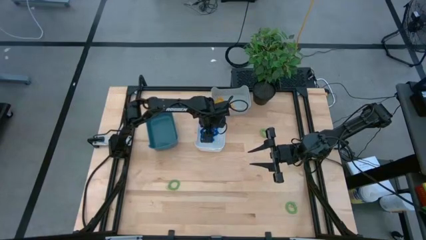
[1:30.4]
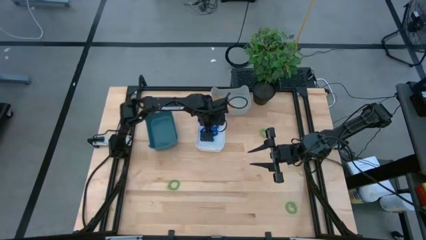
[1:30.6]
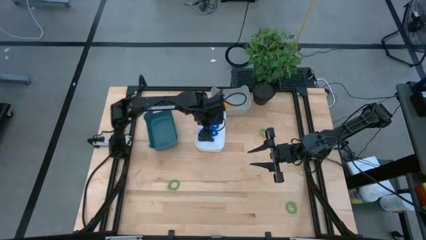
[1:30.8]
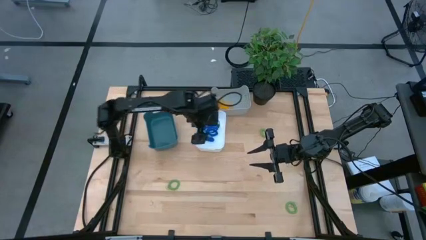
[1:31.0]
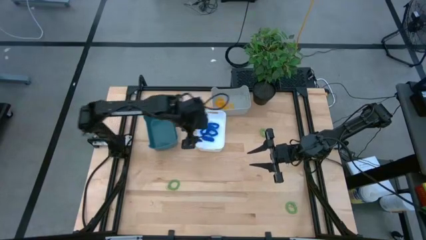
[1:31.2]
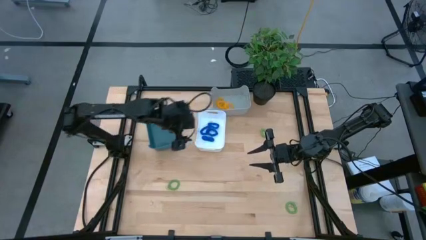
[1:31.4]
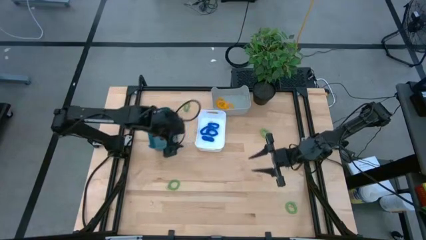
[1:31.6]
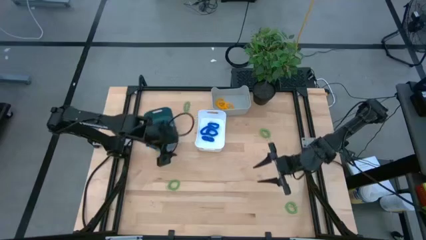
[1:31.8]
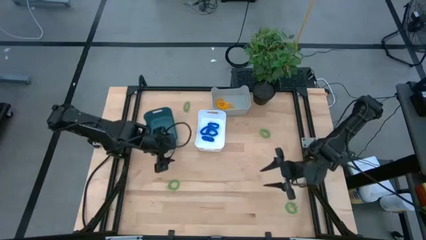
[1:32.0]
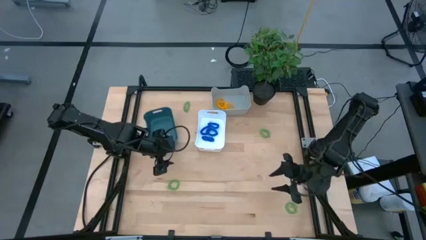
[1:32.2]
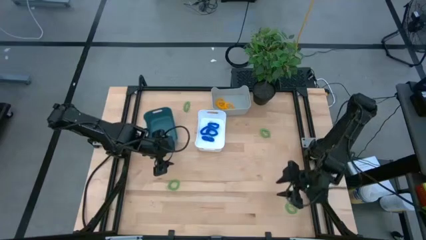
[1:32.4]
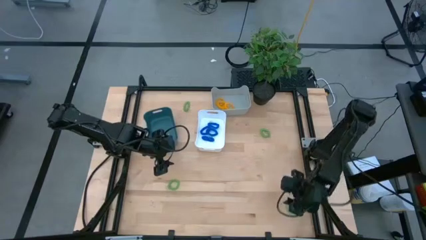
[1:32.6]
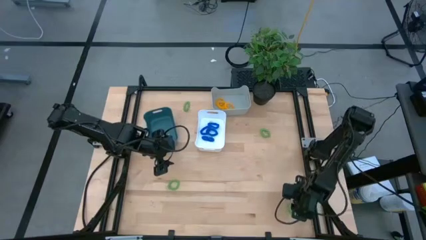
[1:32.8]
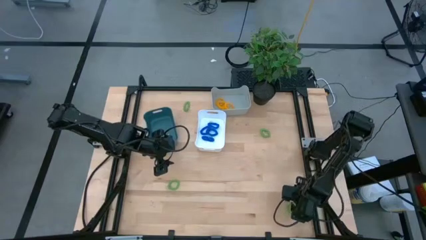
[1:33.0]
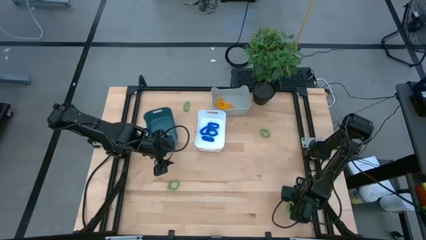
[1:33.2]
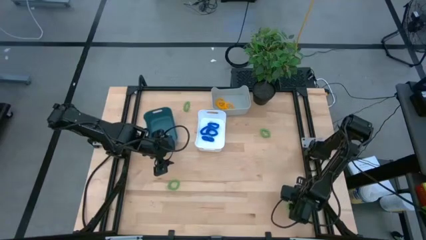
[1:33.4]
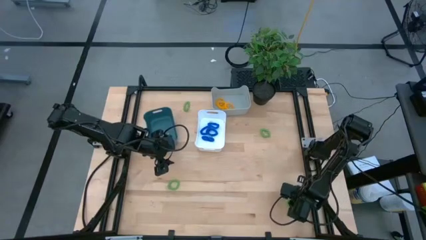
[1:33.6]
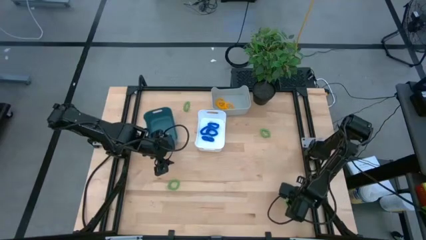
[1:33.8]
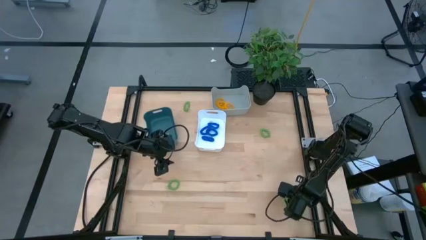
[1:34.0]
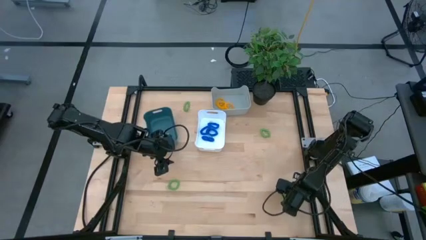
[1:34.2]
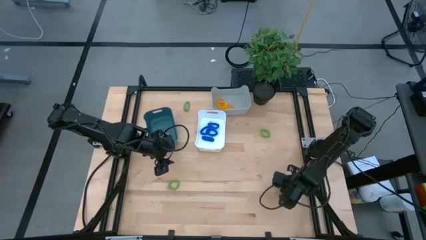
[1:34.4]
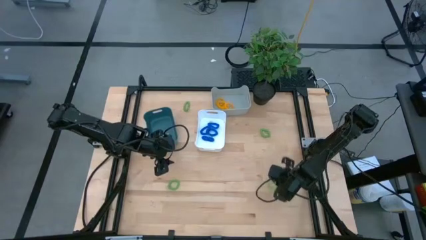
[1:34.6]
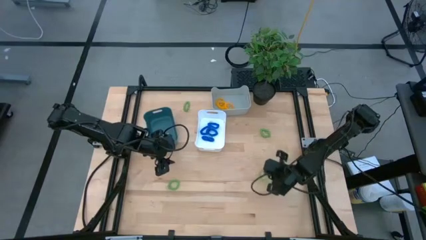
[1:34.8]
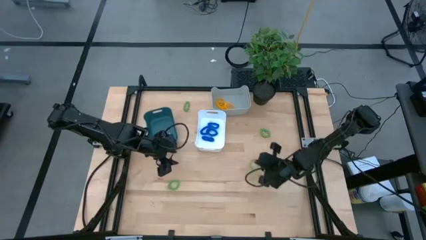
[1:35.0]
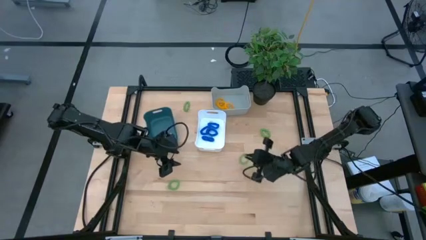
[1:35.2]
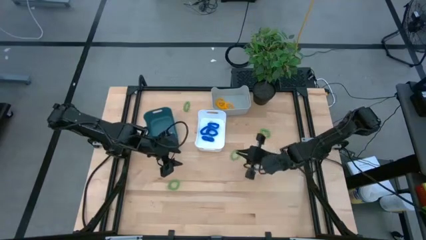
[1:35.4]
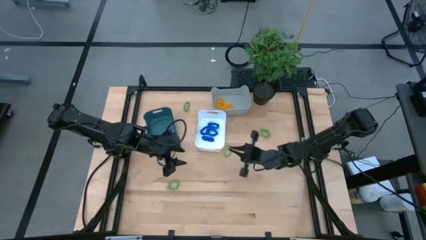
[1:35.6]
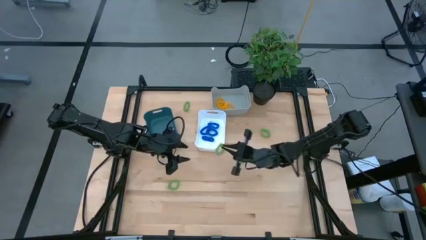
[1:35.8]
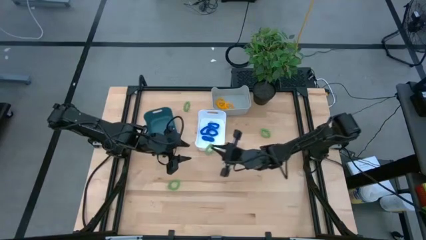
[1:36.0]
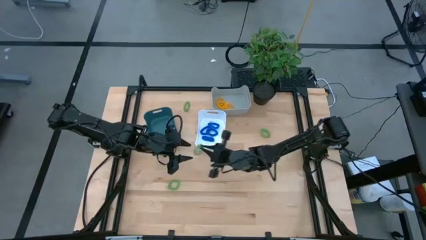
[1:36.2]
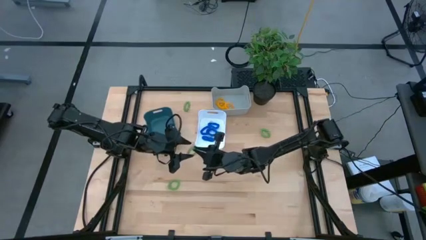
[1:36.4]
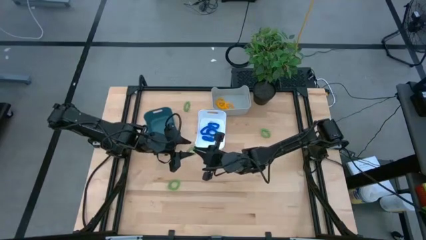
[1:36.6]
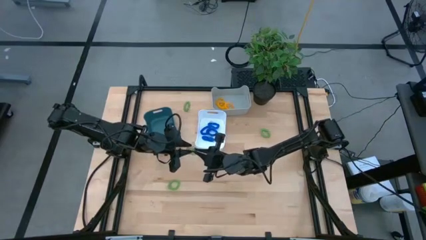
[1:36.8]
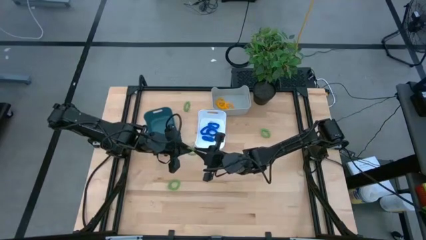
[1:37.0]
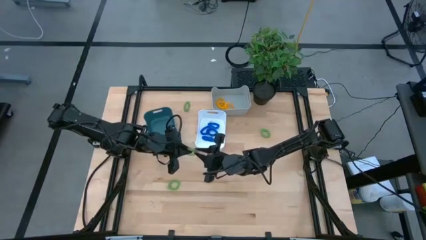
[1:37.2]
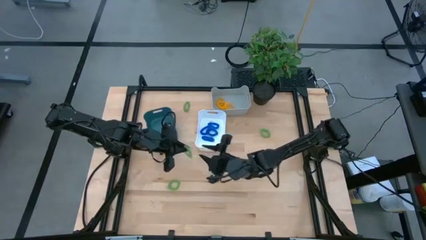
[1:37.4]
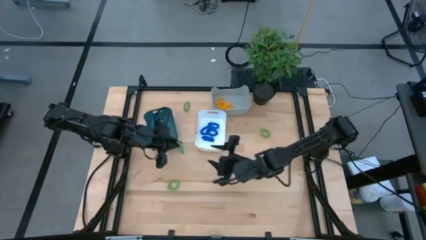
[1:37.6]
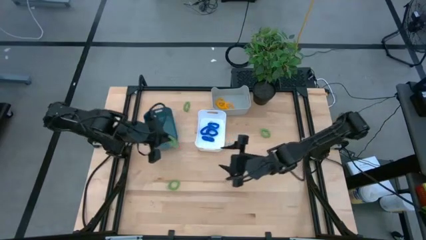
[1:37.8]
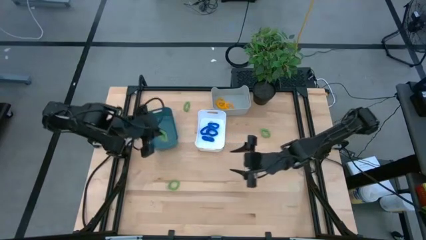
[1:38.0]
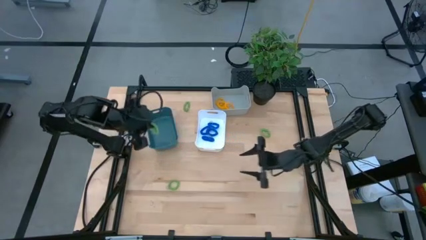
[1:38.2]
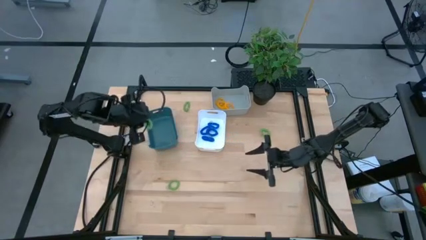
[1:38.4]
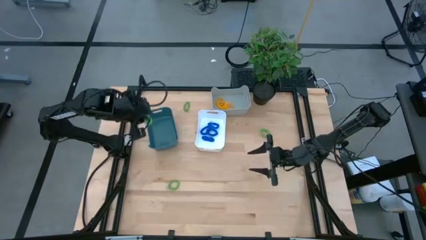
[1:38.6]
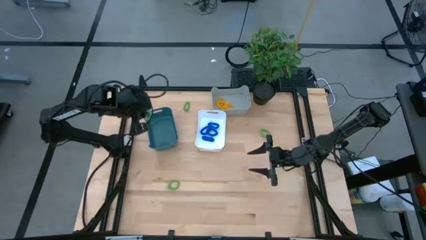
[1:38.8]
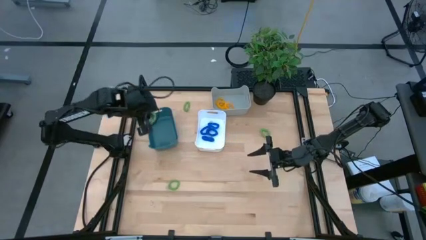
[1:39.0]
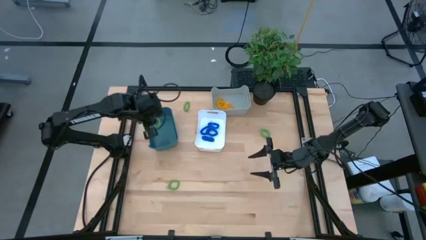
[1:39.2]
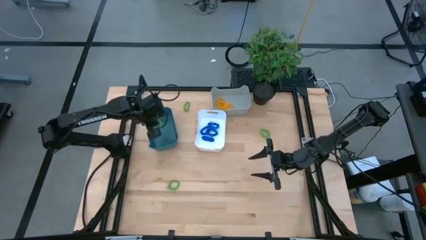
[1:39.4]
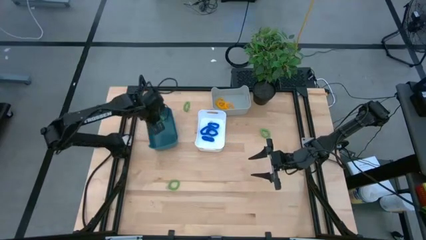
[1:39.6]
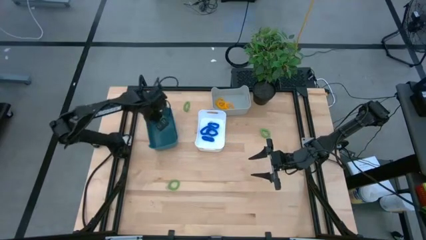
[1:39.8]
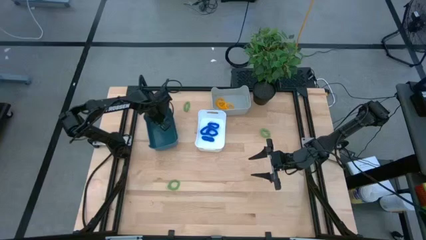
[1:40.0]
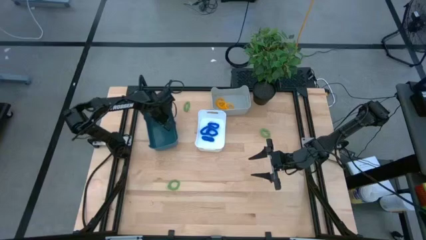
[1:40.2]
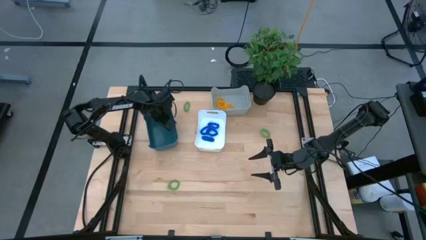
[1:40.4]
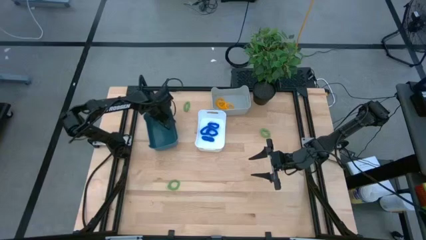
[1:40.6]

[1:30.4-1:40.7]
Task: Sort spring keychains
Put the green spring keychain into the blue bin

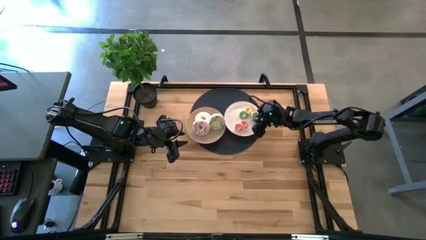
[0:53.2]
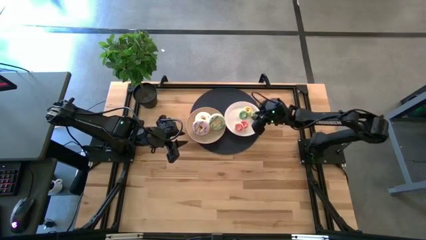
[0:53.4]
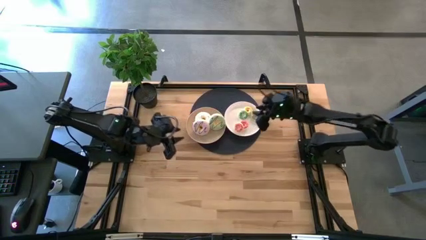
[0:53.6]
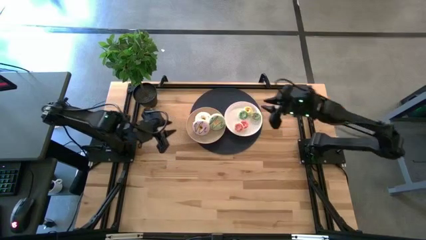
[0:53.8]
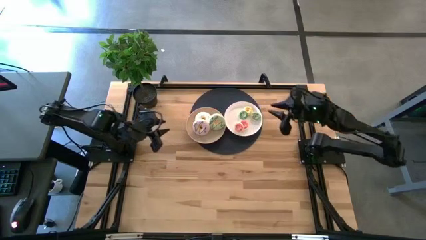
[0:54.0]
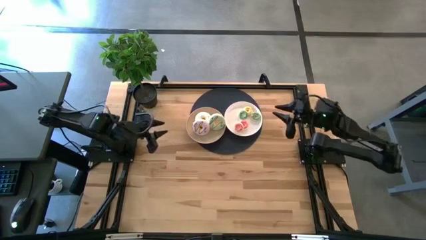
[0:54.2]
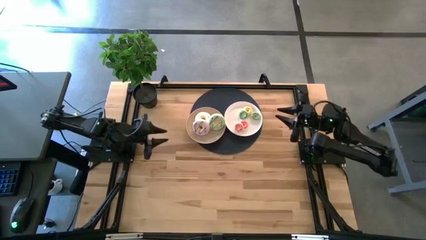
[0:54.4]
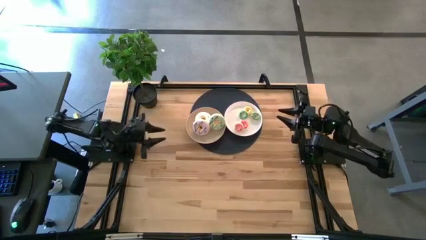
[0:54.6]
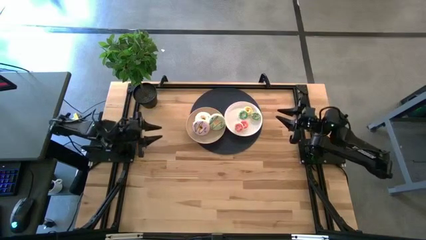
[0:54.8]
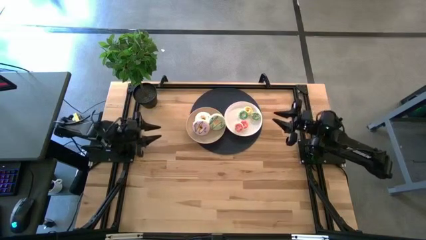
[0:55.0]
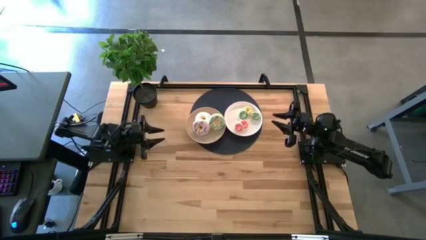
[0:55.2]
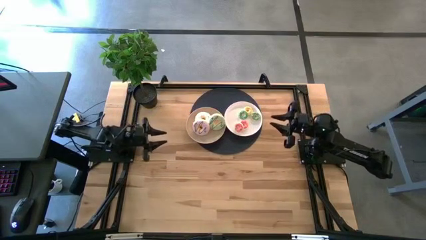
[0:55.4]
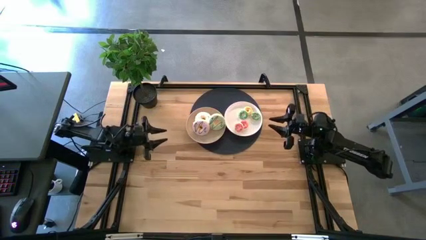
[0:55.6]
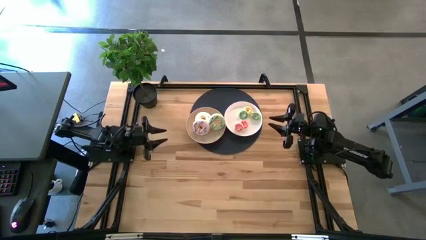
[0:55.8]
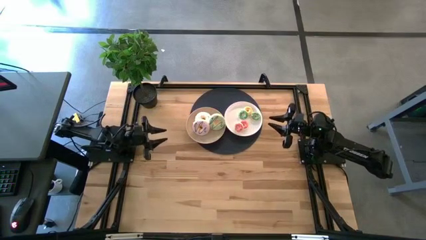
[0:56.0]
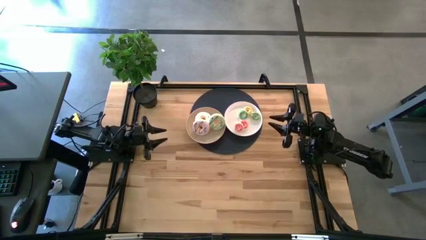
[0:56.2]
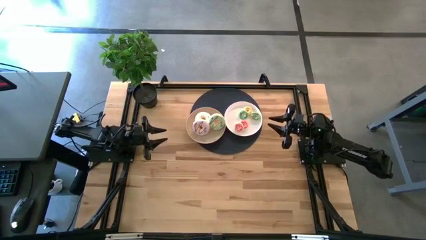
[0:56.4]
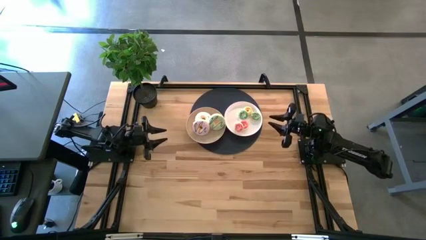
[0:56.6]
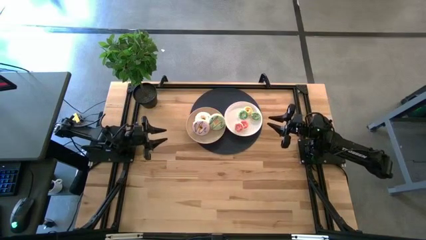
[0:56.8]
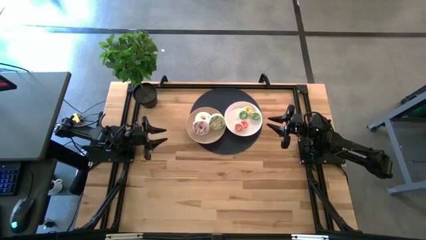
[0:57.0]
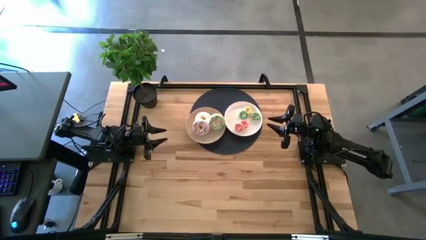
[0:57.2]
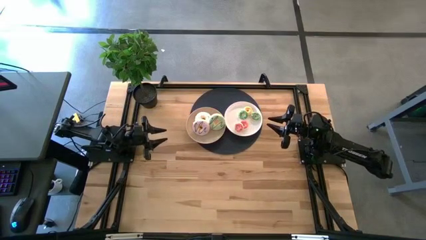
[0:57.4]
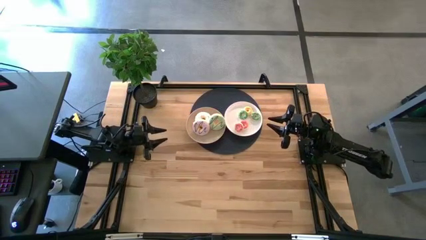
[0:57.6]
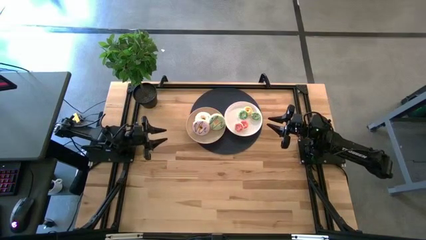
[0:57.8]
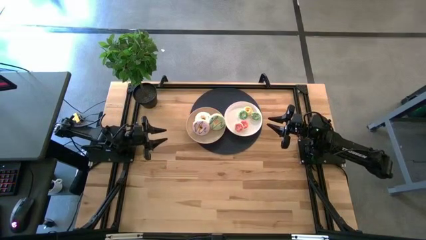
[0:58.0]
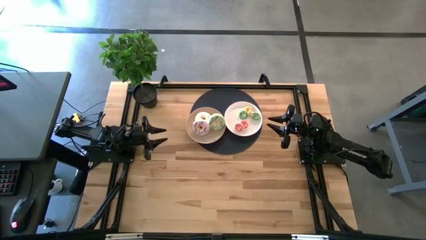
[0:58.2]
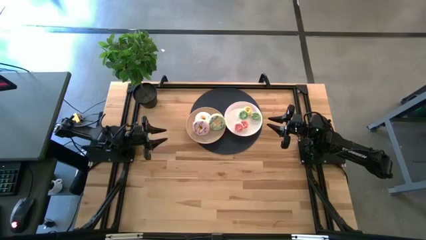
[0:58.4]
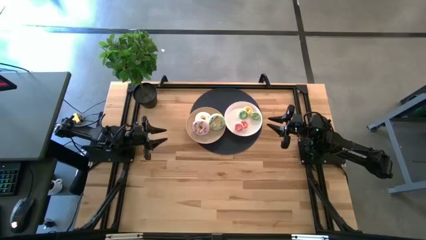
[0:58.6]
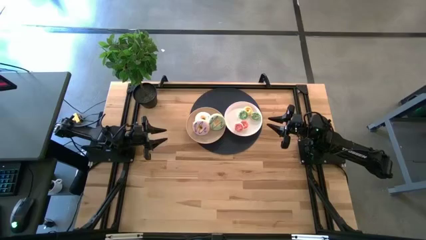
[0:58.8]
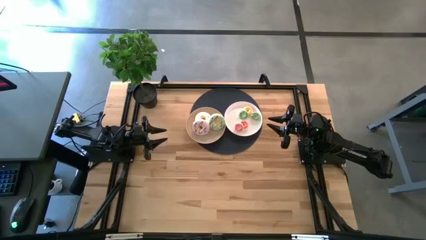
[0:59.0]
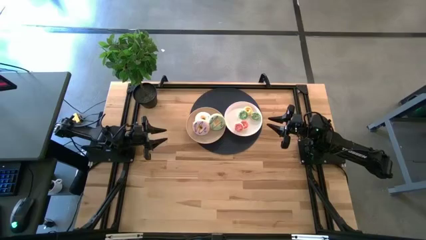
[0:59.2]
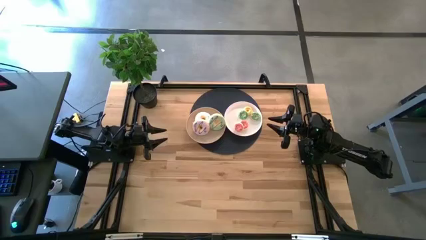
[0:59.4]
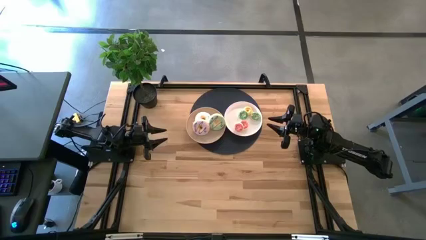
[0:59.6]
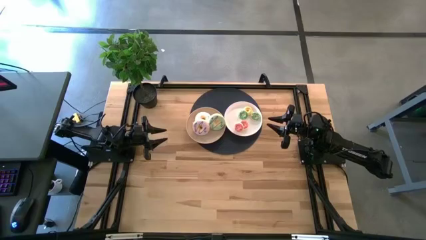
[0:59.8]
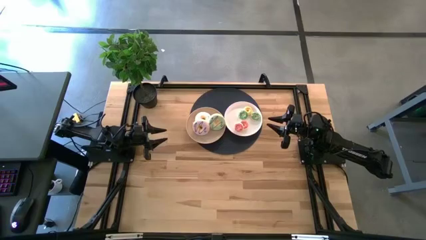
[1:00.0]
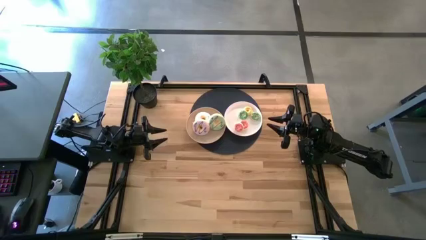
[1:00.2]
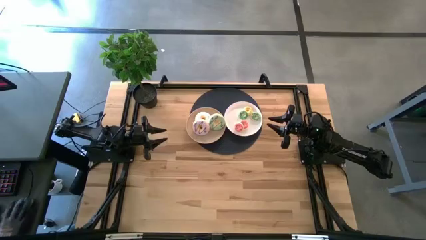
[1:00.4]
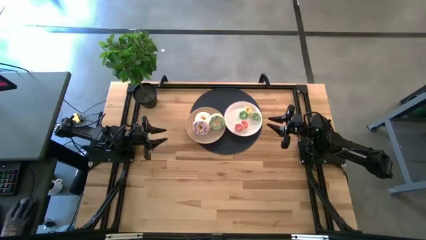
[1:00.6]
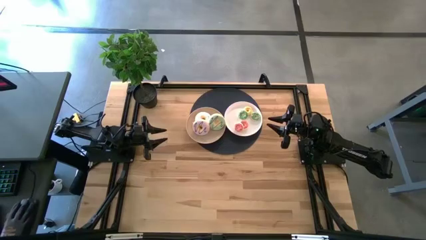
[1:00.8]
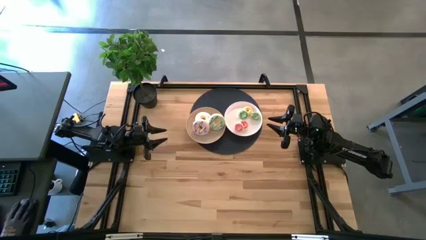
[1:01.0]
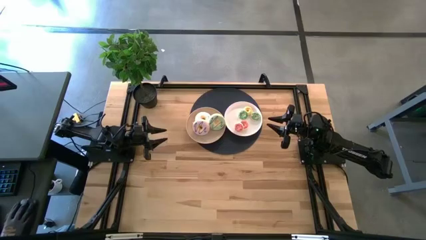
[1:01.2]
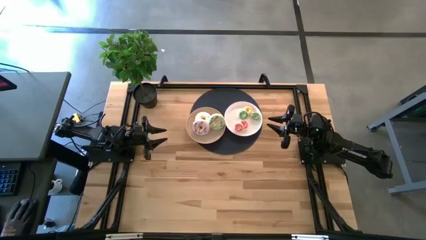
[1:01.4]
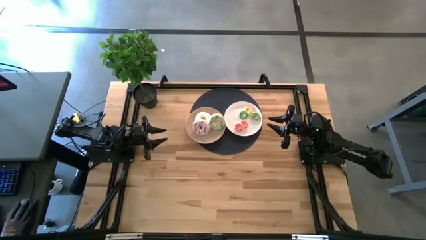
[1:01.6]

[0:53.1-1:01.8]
Task: Pick & Place donuts
Return to Home Position
